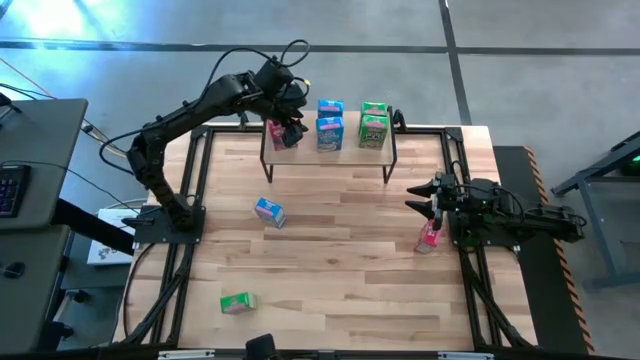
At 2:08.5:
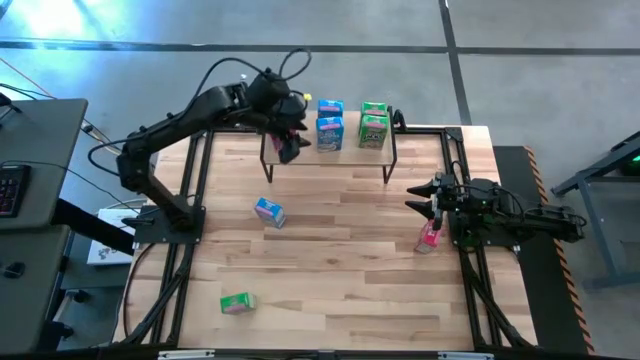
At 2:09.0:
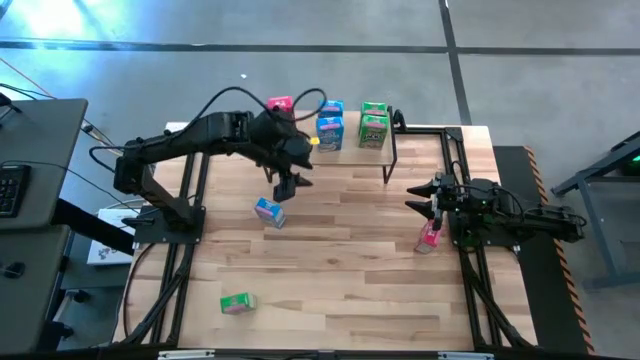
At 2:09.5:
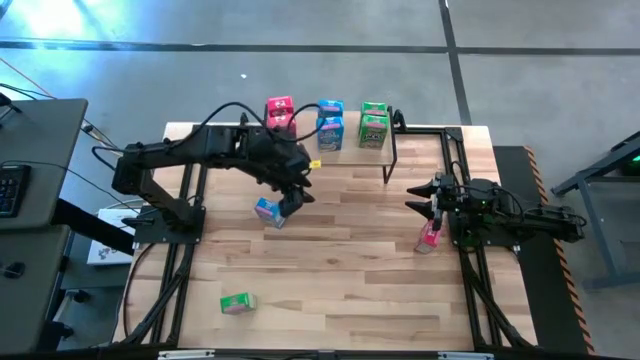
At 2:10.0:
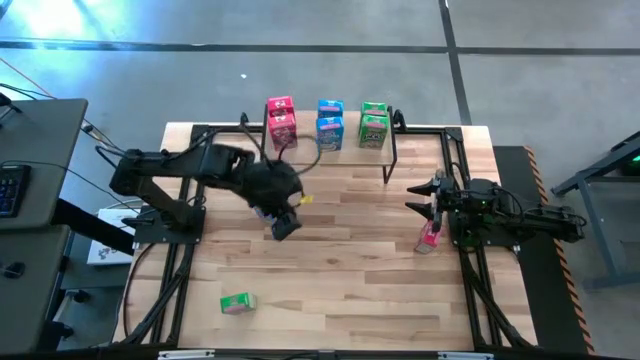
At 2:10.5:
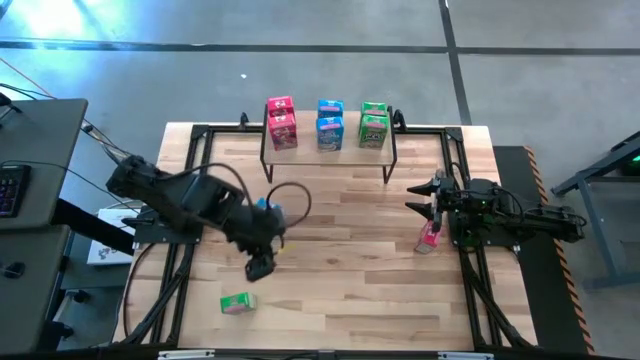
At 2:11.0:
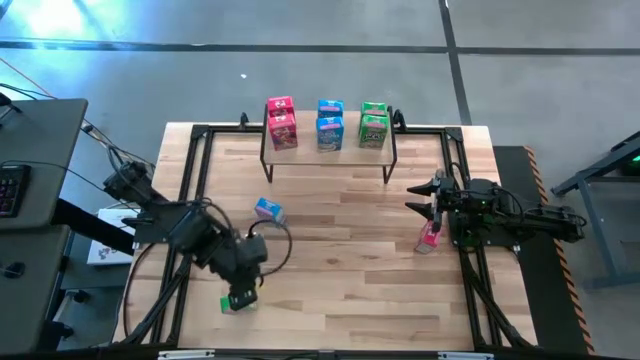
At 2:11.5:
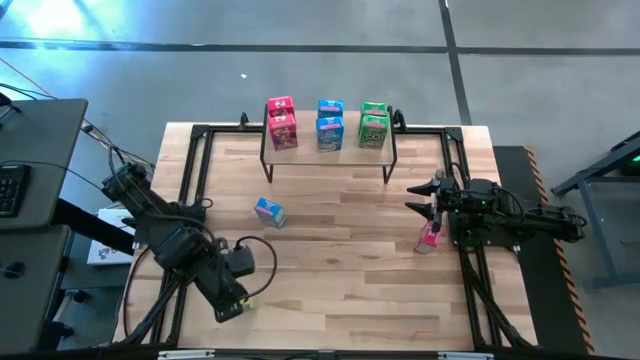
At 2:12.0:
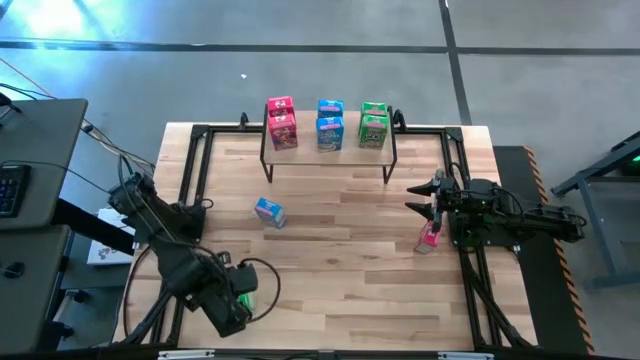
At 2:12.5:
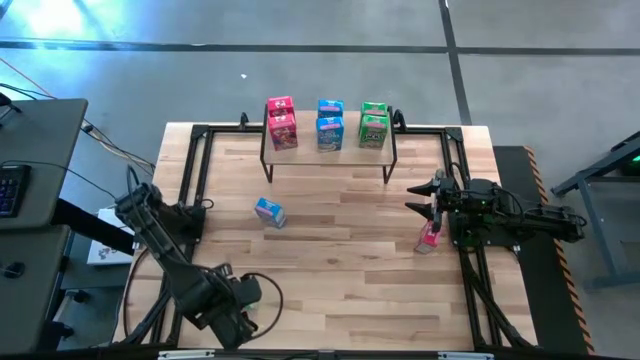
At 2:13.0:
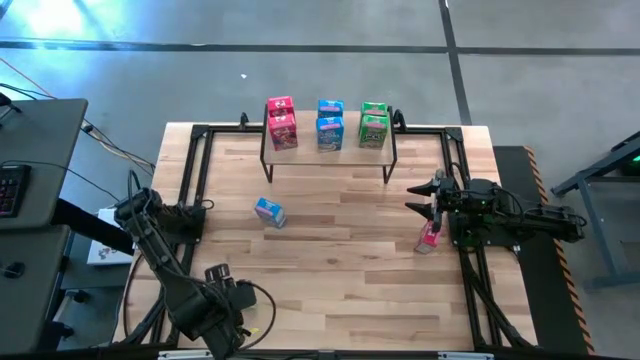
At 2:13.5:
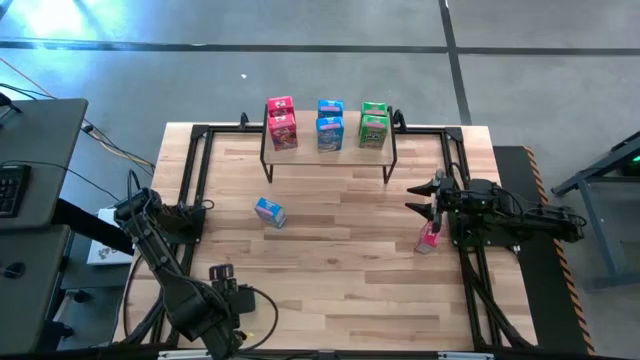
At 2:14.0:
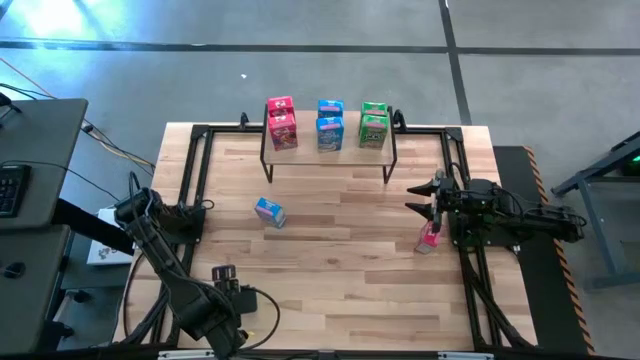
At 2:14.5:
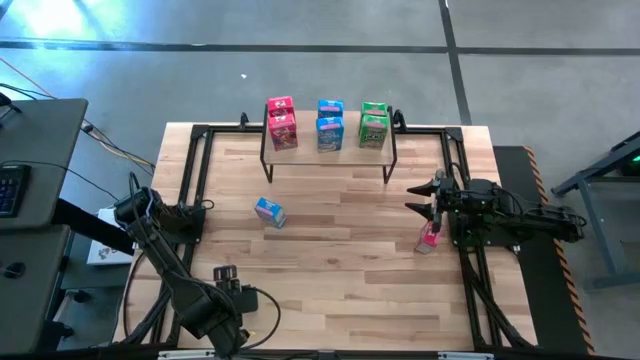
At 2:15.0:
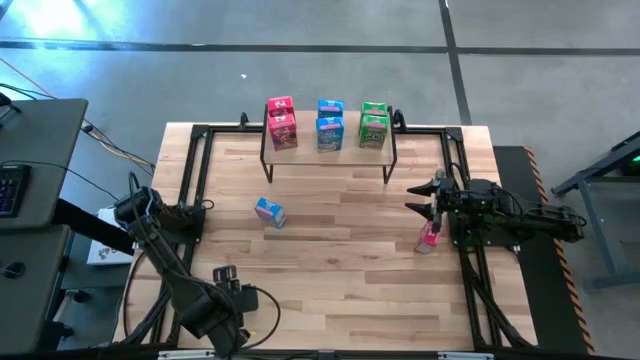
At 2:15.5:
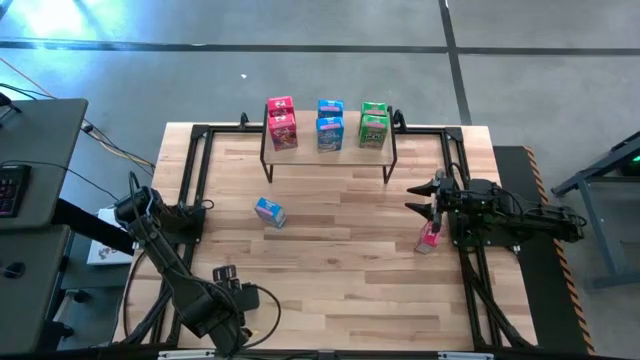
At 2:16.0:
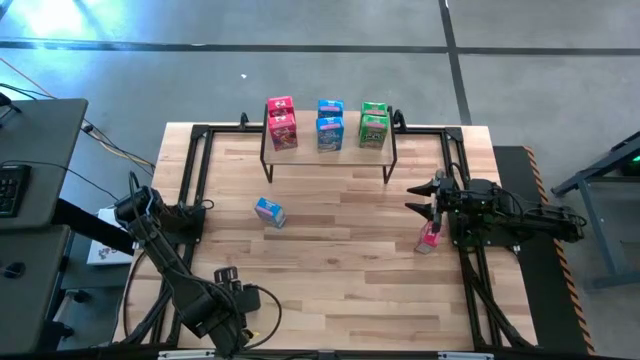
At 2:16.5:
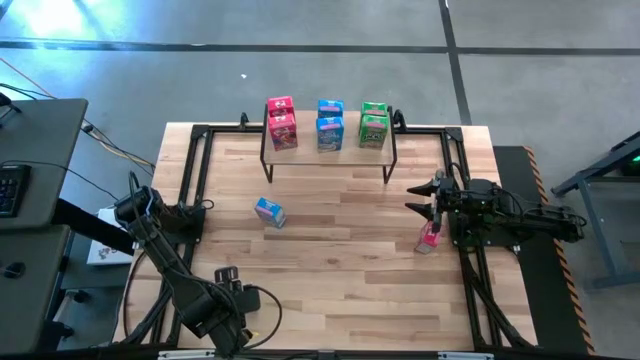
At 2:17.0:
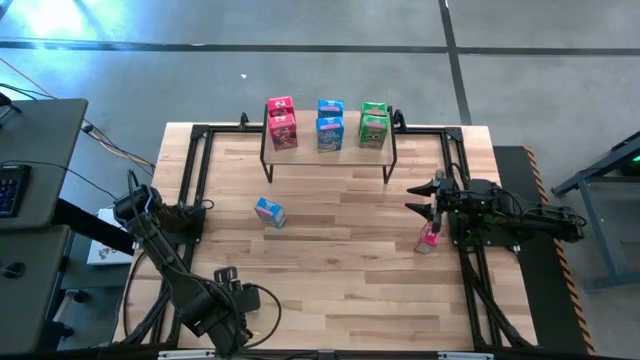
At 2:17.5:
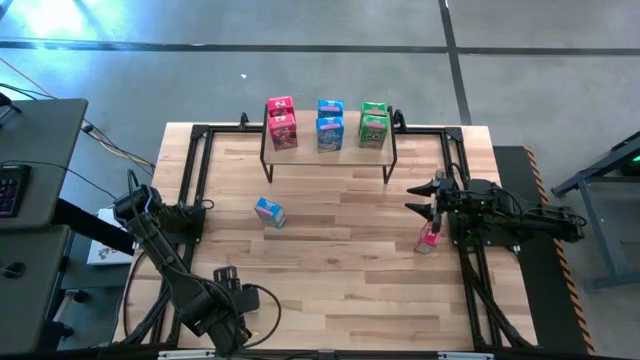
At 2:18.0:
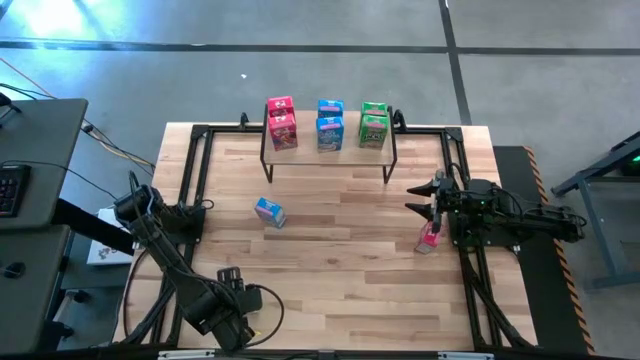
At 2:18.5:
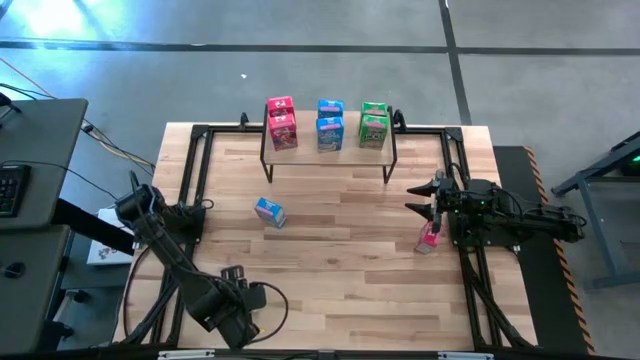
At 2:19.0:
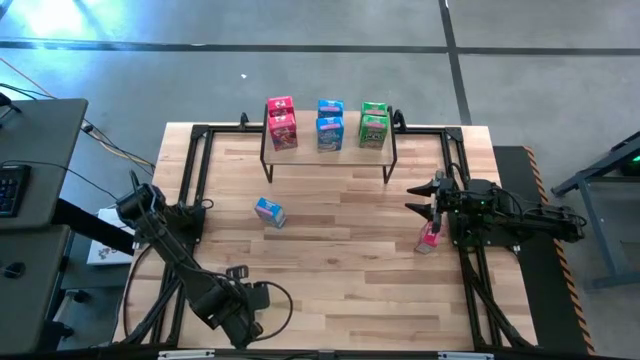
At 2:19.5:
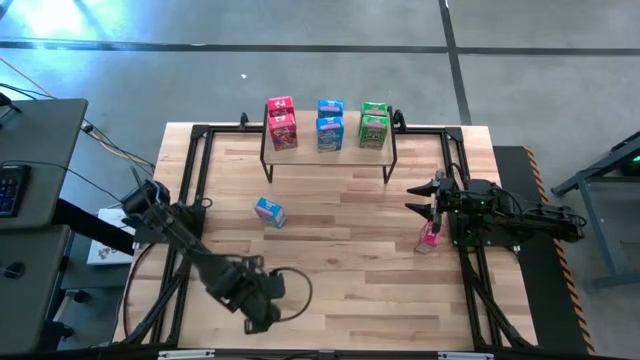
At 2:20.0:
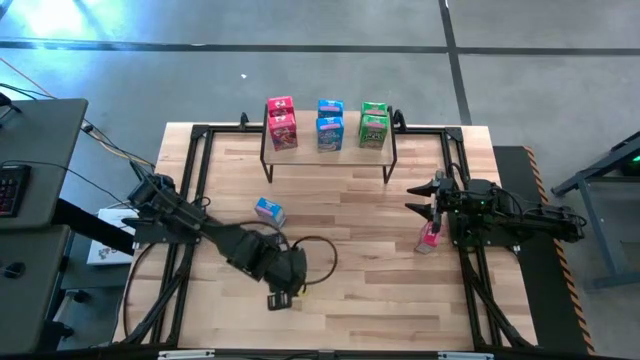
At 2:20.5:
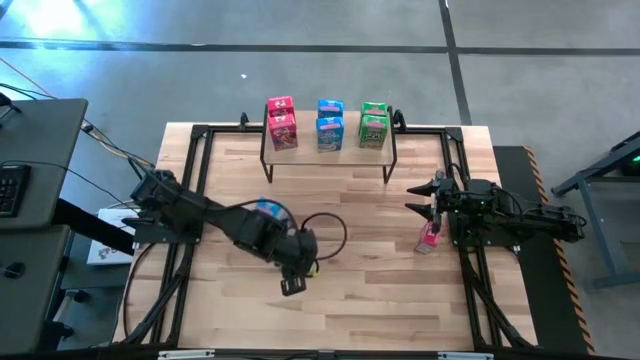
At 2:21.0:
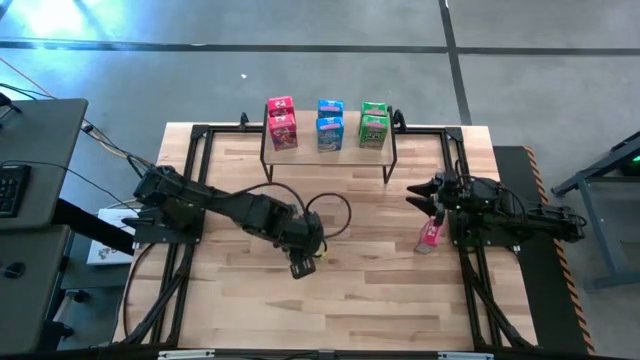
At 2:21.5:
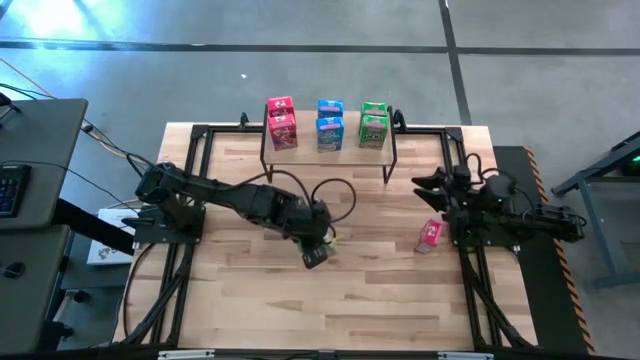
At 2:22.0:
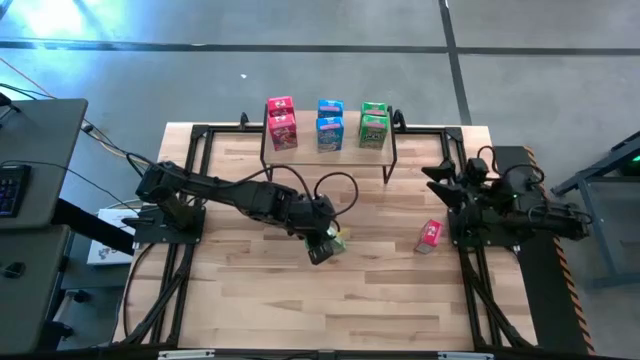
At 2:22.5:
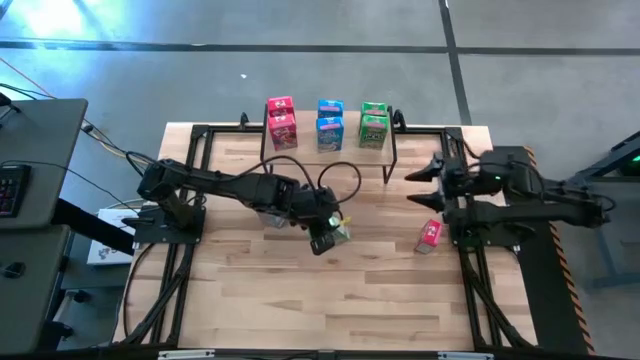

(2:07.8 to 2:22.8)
Task: Stack cereal on shelf
Put the green cereal box on the shelf aligned with the other green cereal boxes

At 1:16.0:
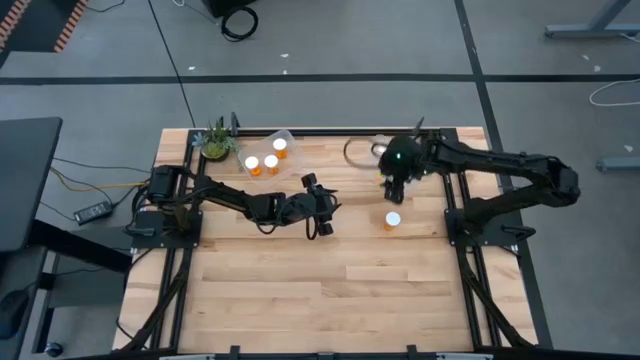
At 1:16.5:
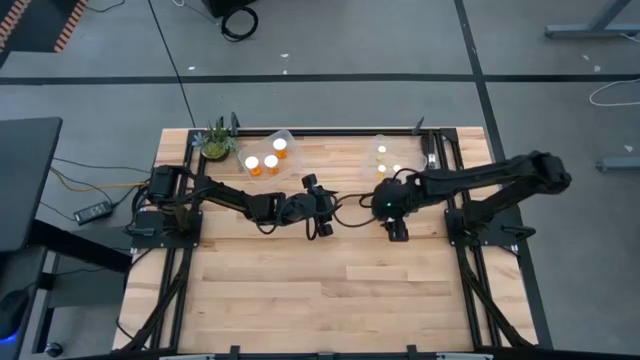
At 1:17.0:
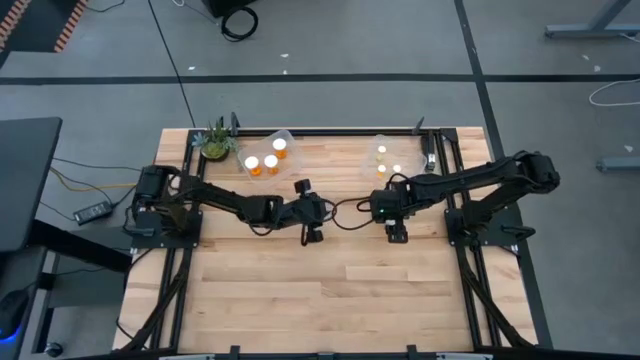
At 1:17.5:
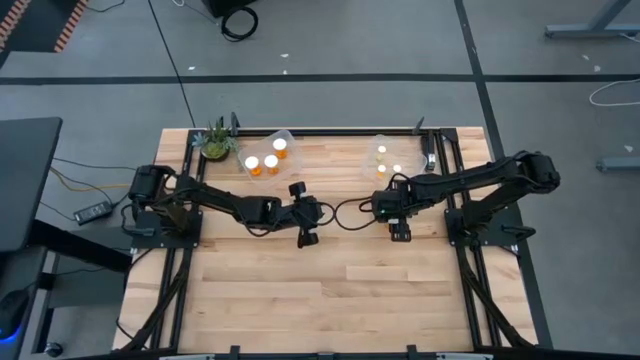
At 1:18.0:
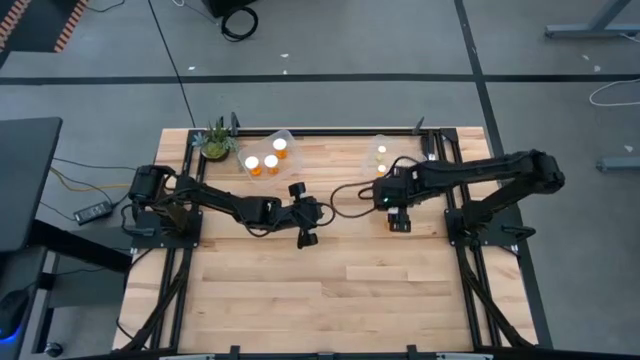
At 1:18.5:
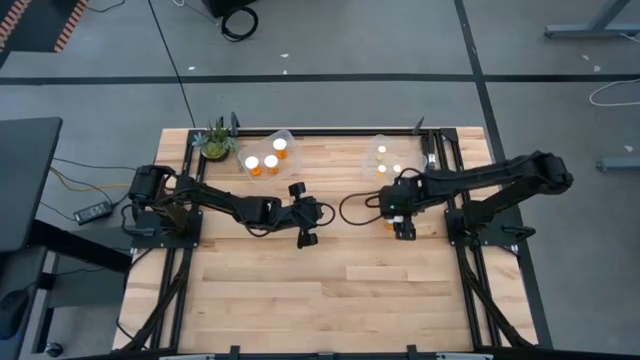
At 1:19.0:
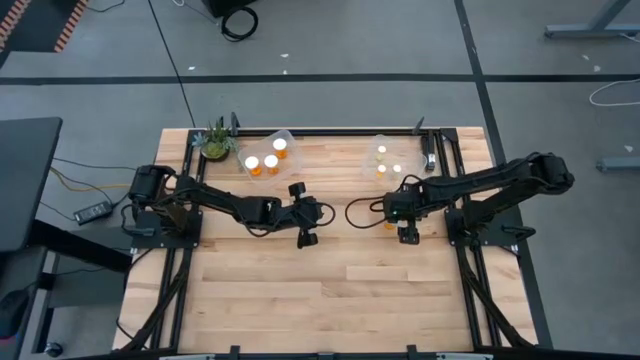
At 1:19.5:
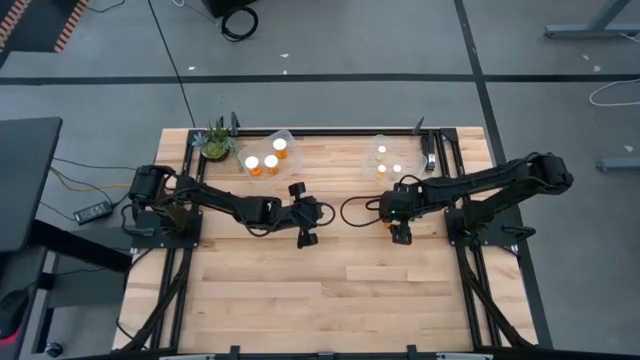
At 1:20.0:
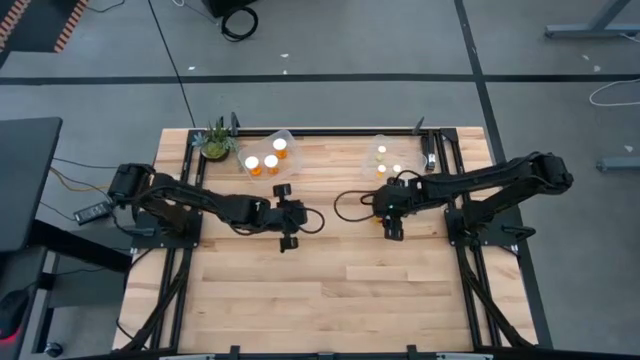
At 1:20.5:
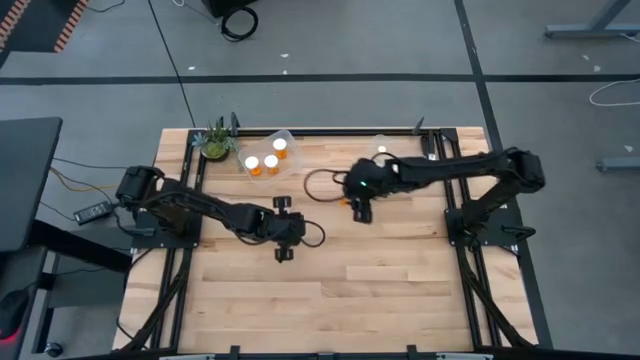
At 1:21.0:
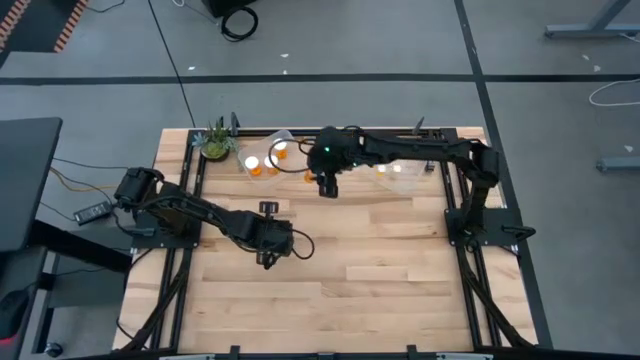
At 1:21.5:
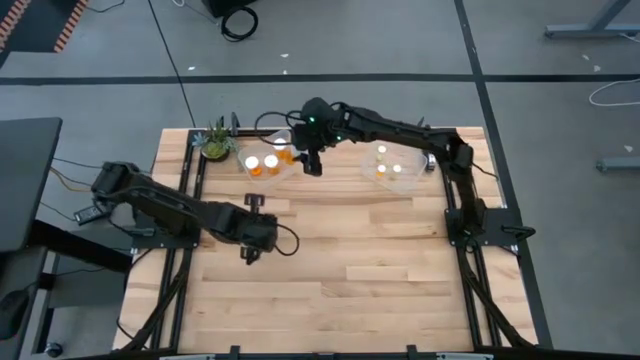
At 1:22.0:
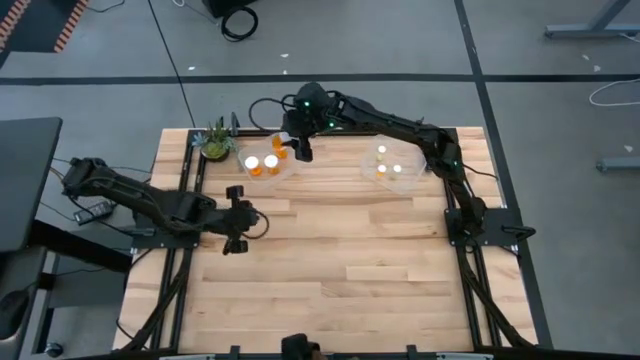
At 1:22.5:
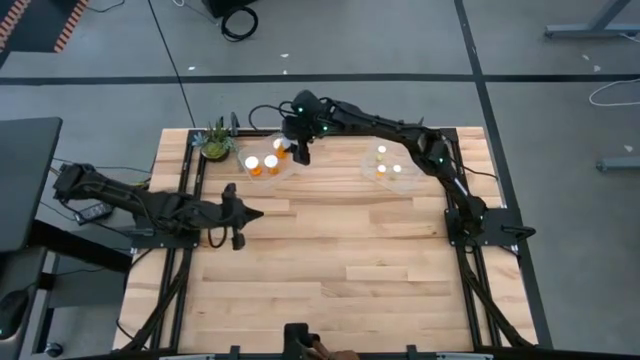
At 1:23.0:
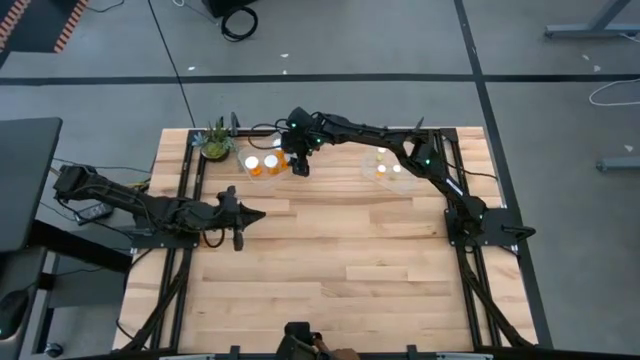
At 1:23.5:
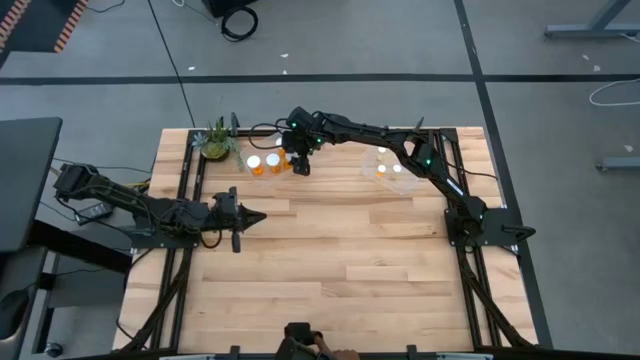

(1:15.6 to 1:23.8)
Task: Pick and place medicine bottles into bin by pill shape (circle, oval)
Put the orange capsule bottle into the left transparent bin
